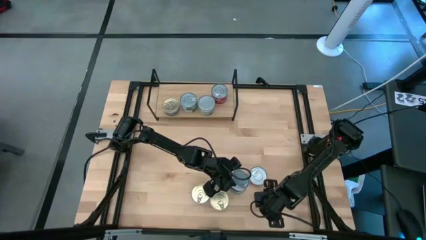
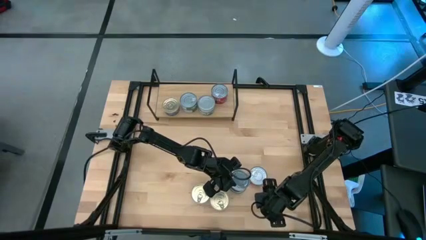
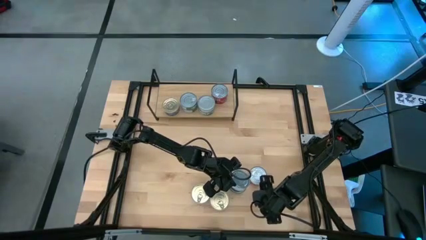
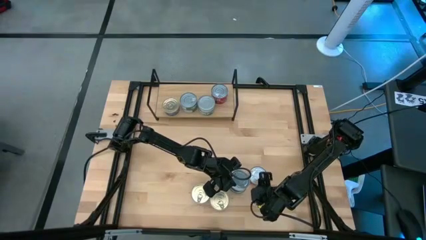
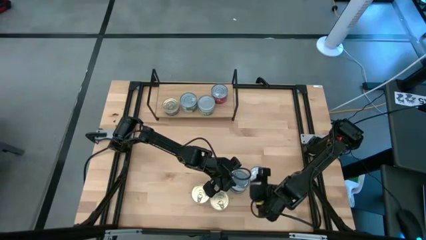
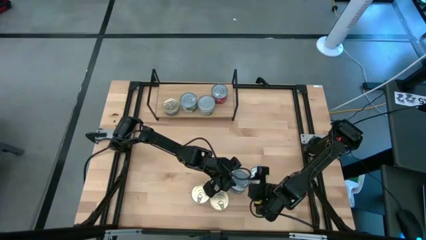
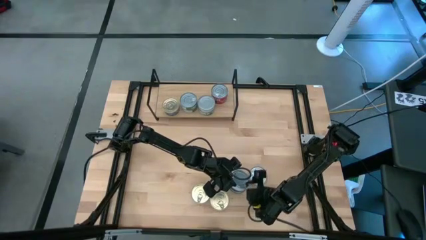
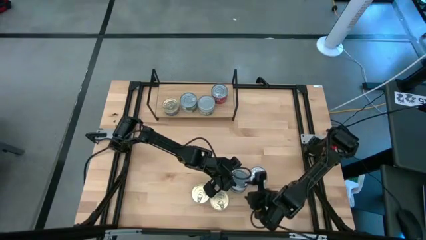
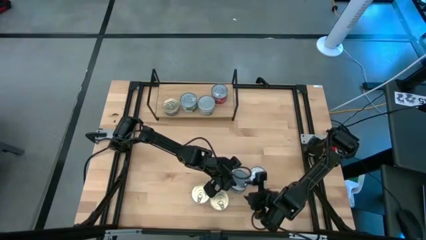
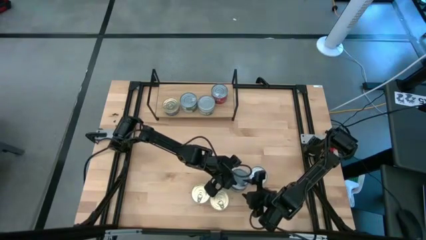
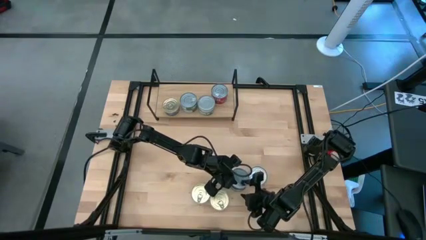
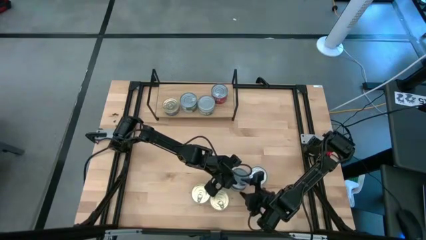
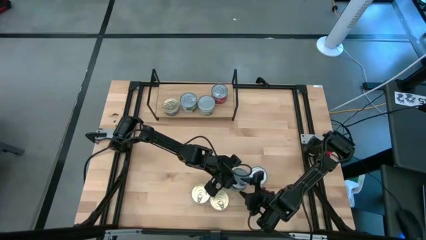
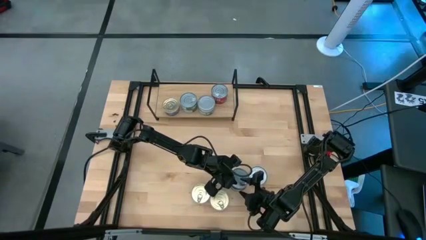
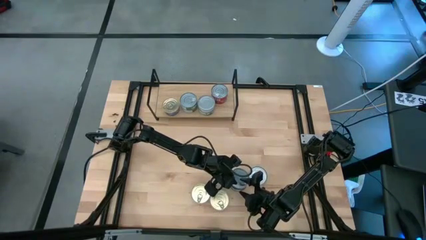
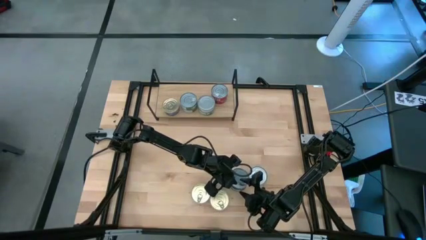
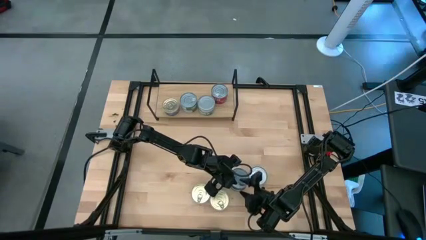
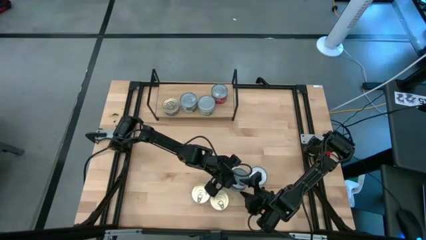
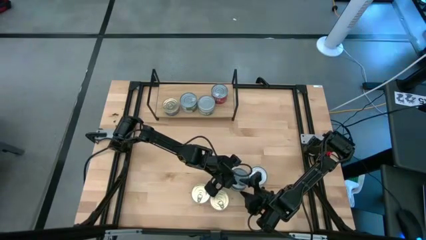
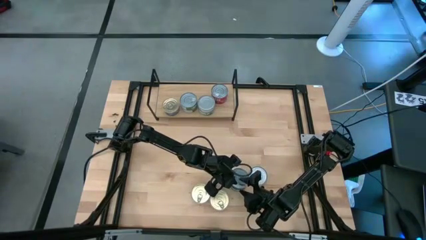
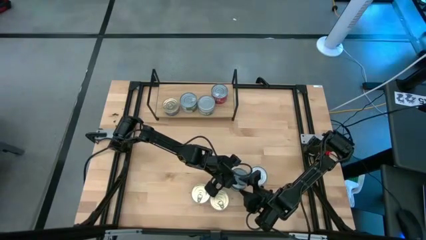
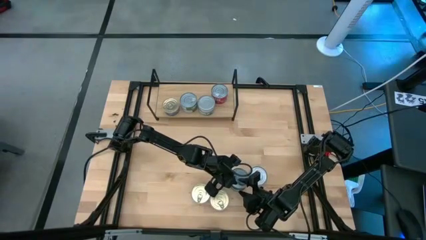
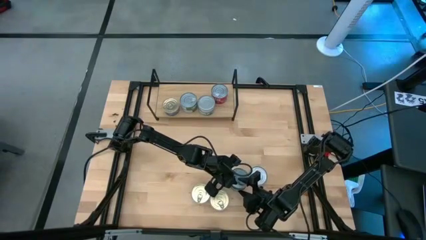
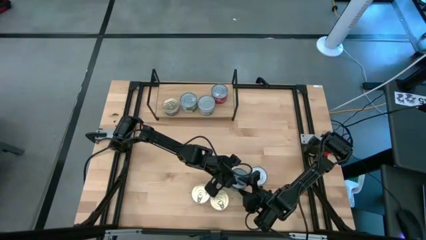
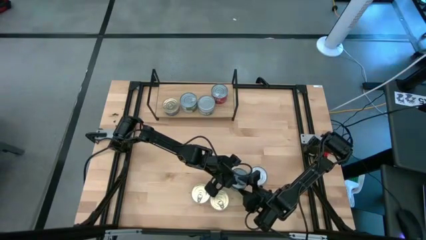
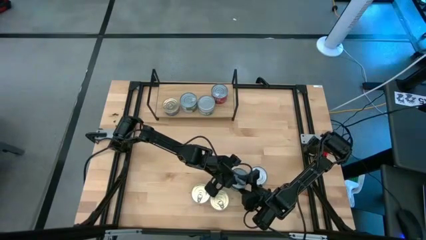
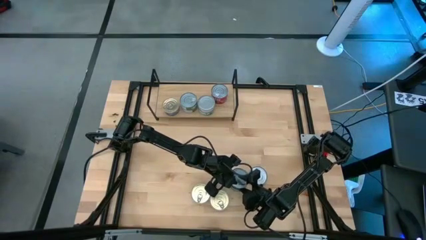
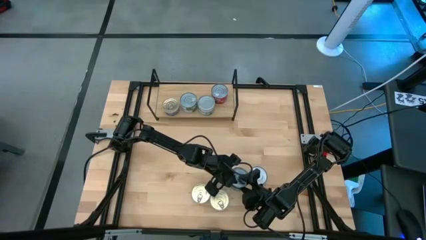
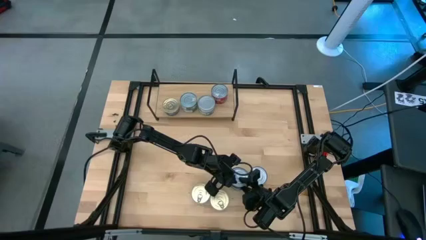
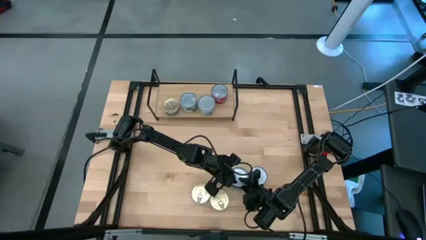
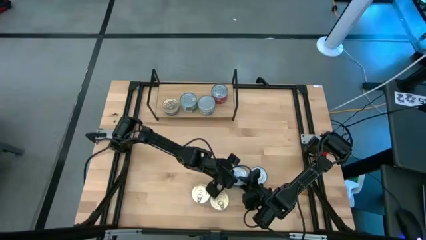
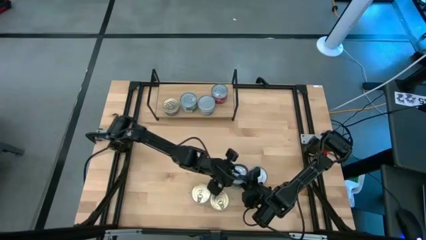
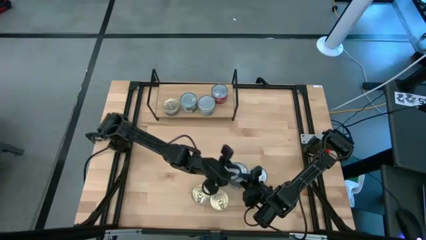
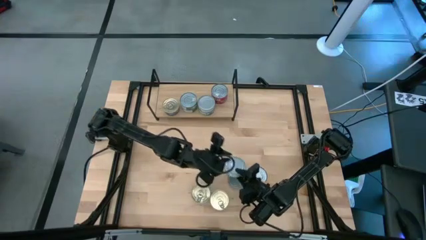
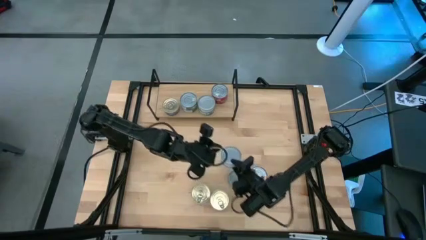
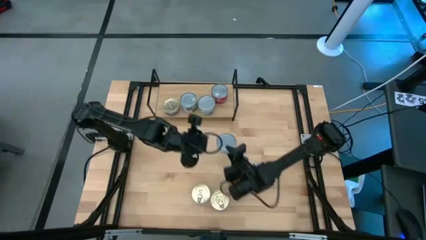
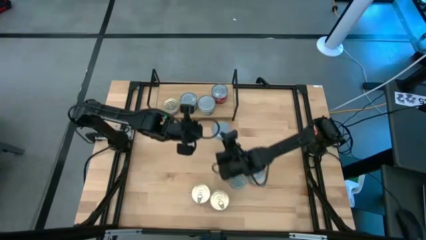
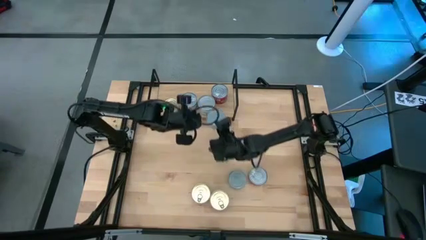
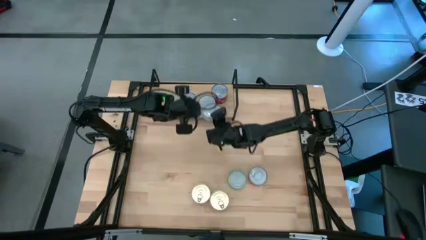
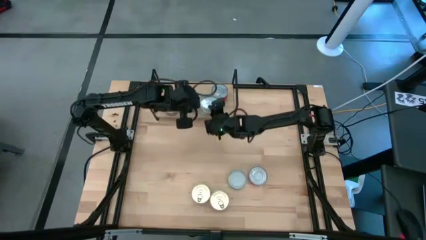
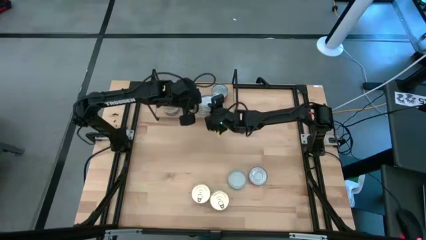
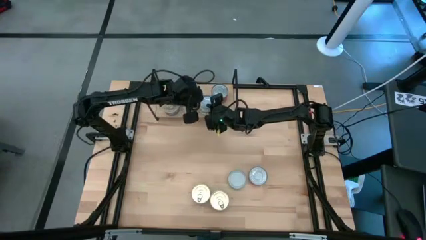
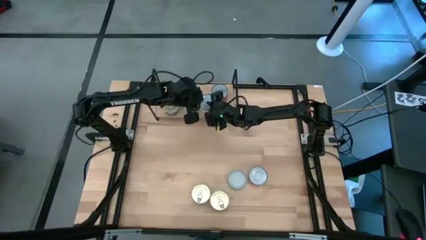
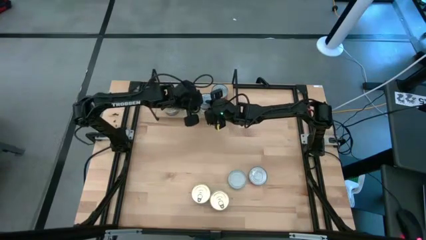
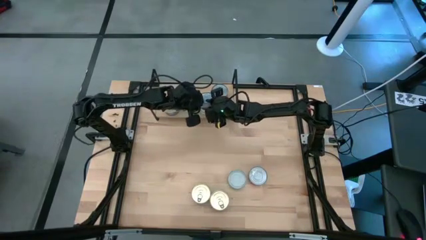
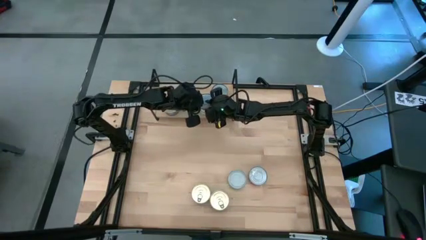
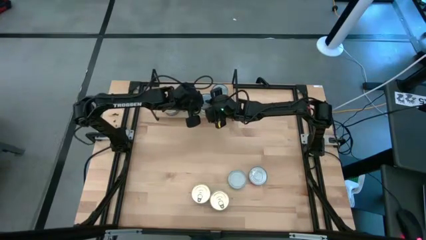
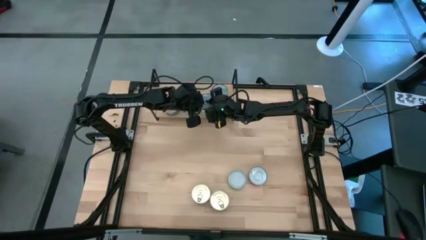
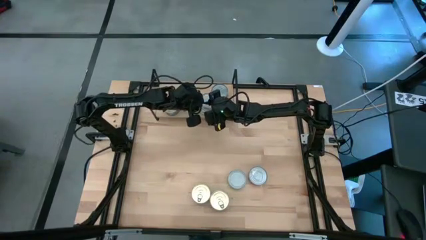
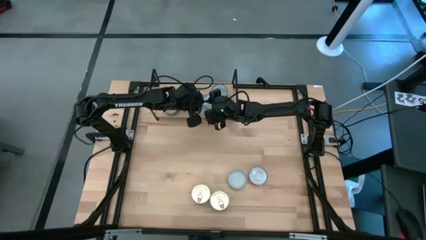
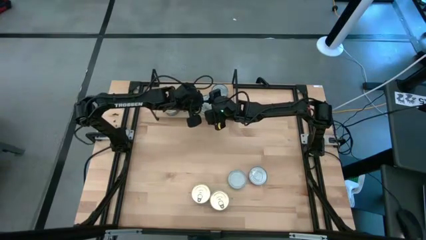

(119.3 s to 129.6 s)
Task: Stack canned seafood by type on shelf
Stack the green white tuna can on top of the other green white tuna can on the shelf

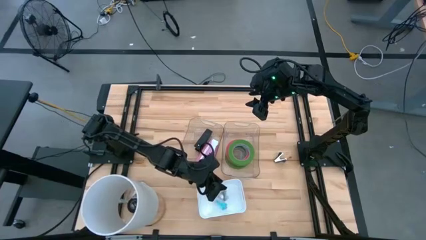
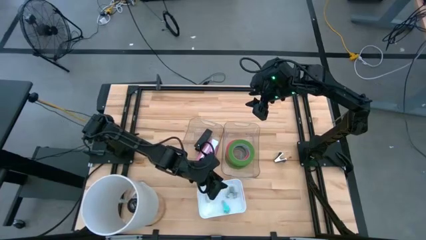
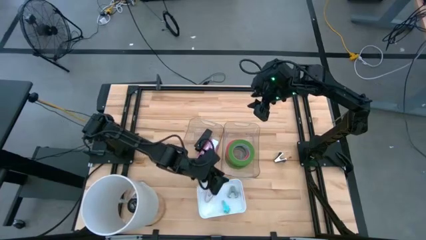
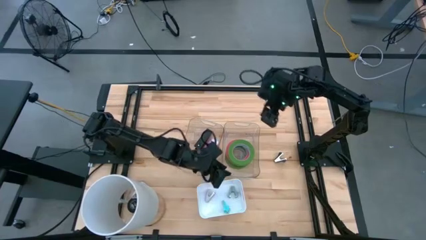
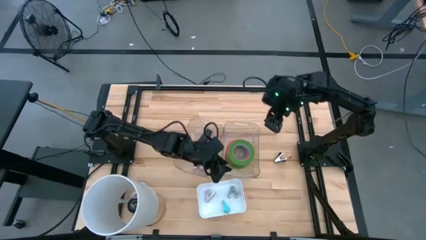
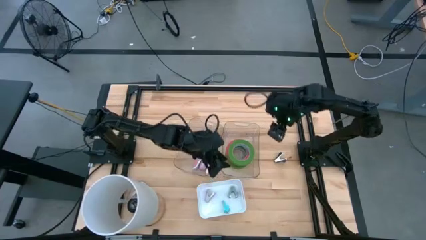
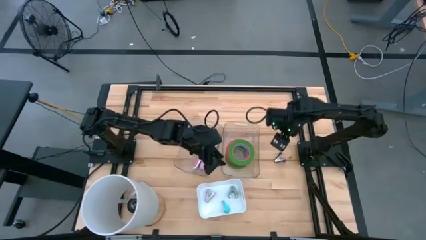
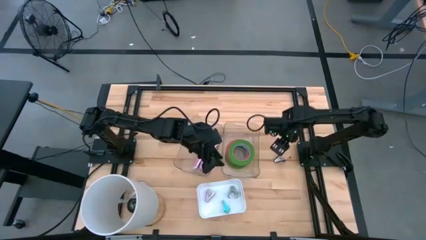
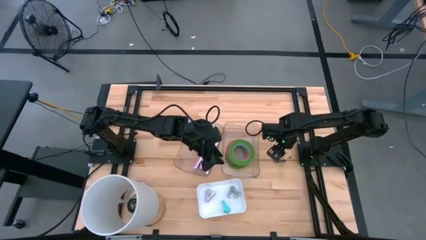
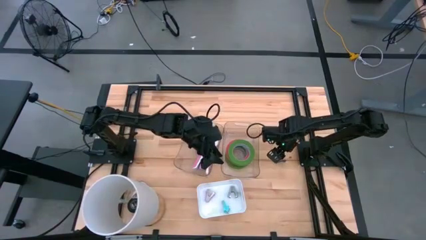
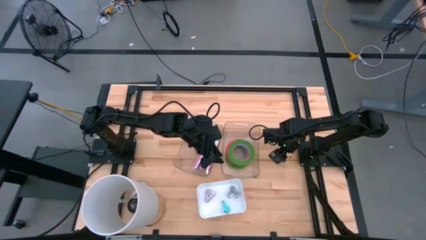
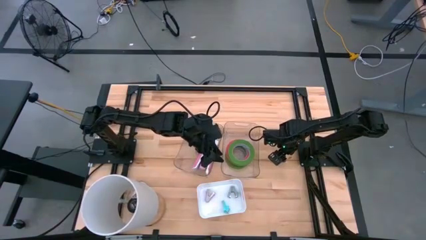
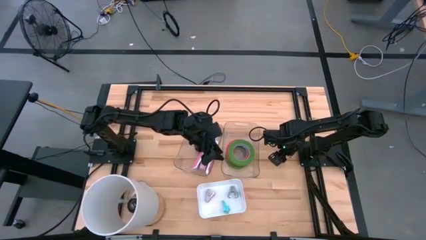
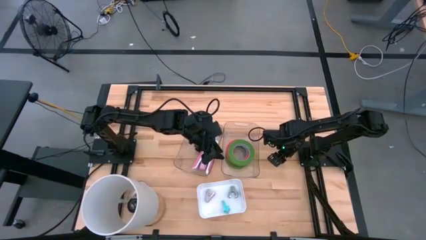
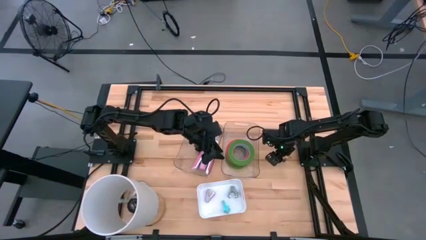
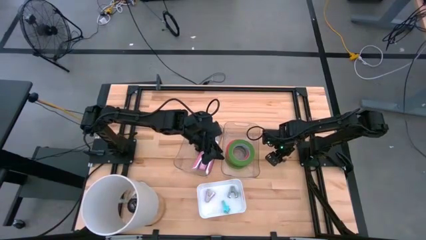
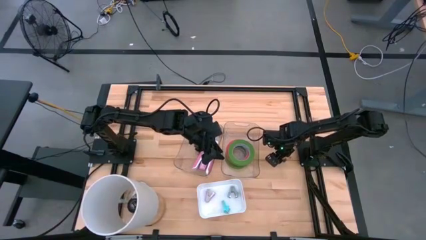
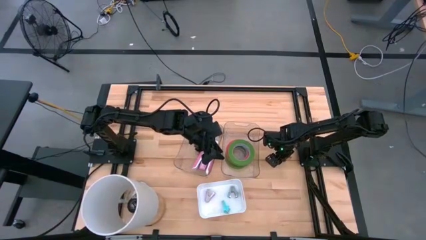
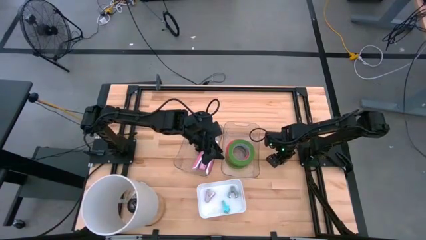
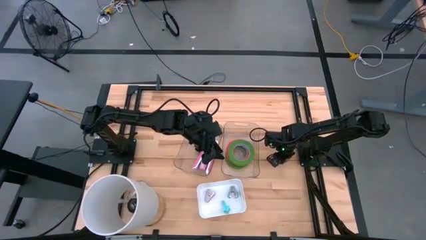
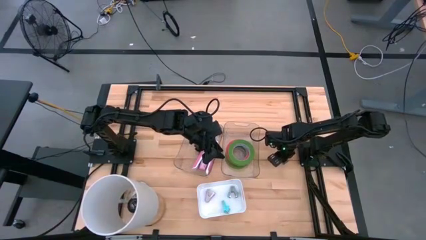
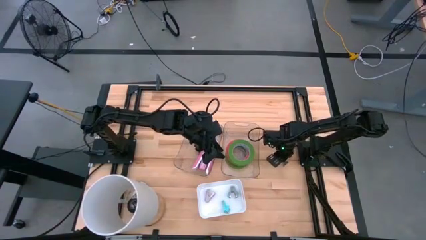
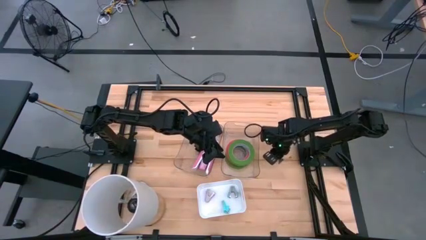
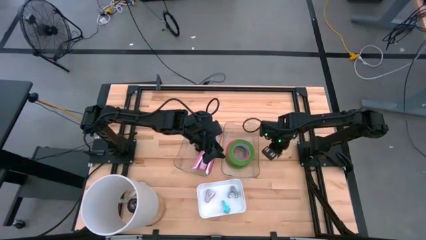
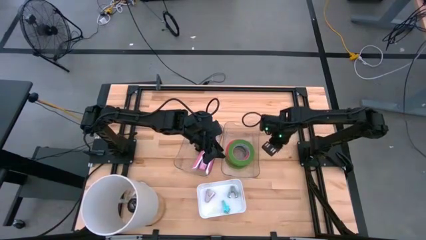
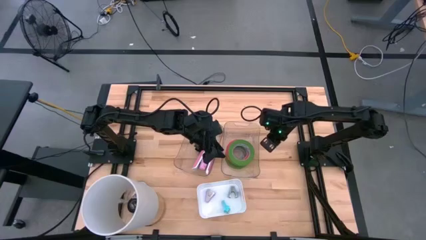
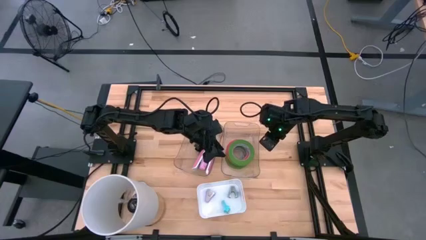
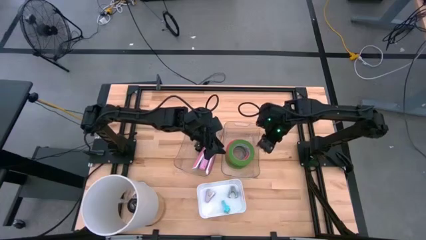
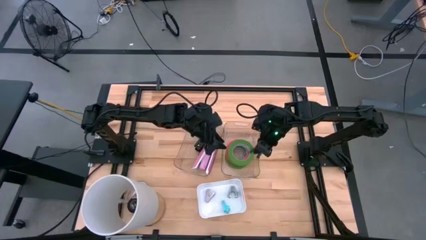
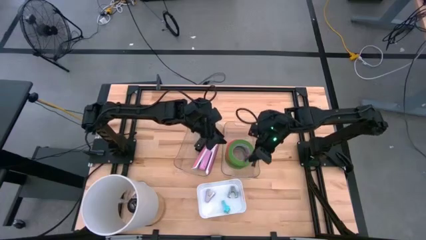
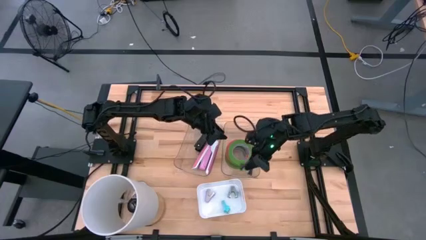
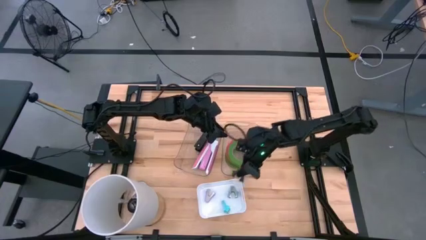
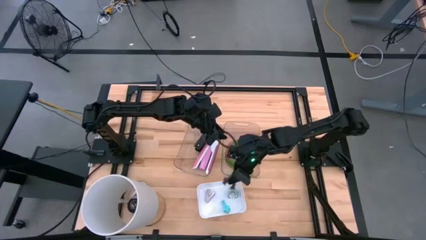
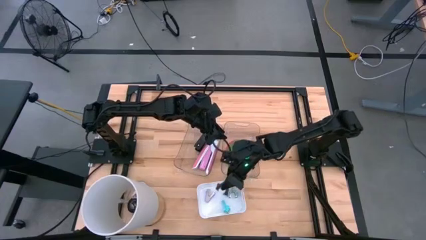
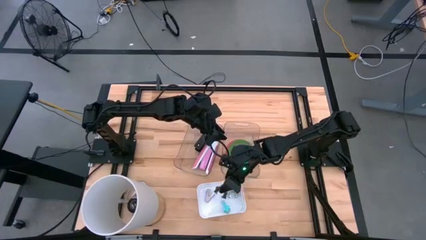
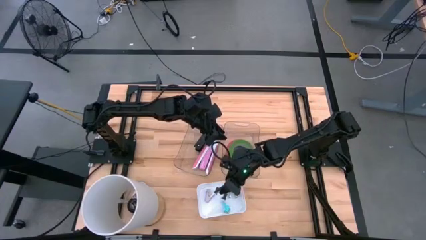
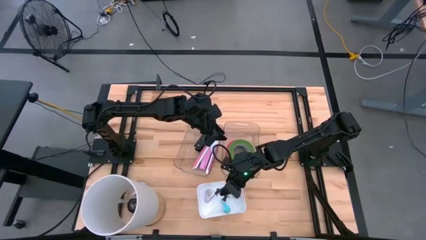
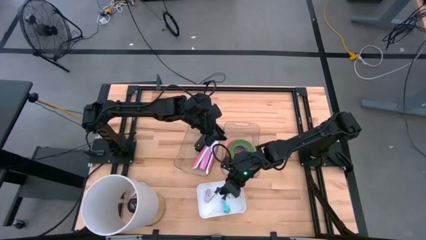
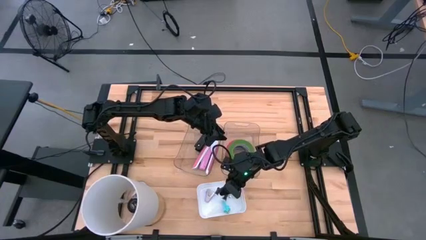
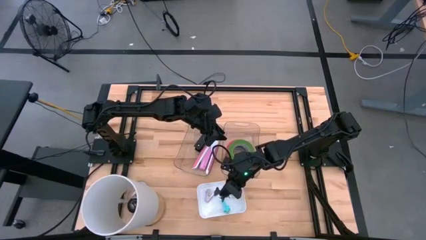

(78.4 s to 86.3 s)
Task: Pick and place Stapler, Stapler remover, tape
Put the black staple remover into the white bin
